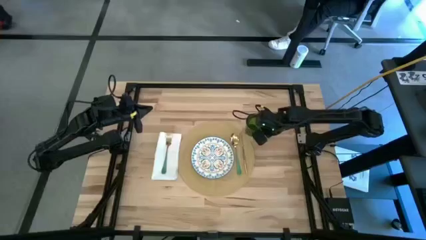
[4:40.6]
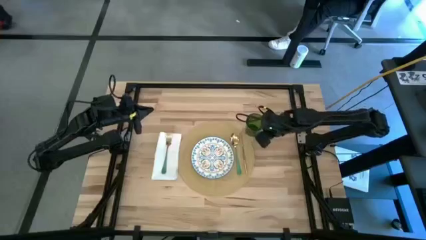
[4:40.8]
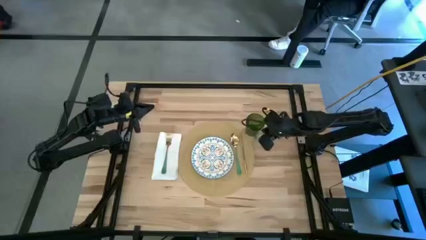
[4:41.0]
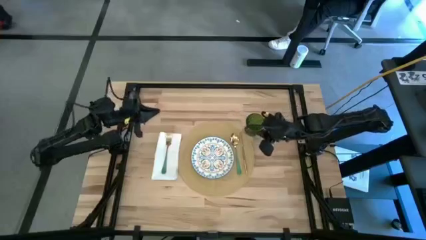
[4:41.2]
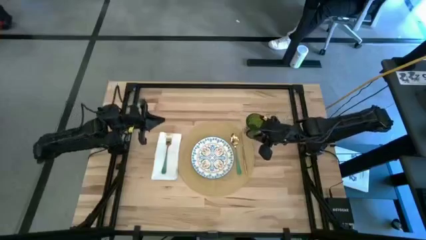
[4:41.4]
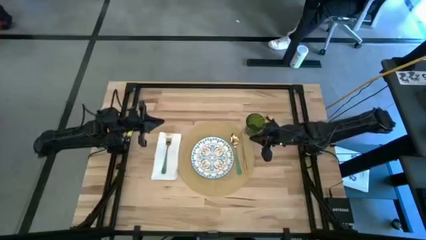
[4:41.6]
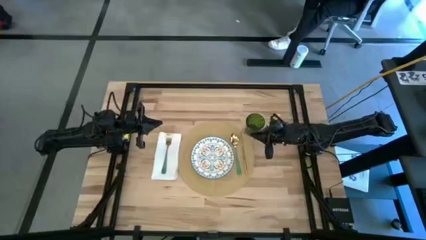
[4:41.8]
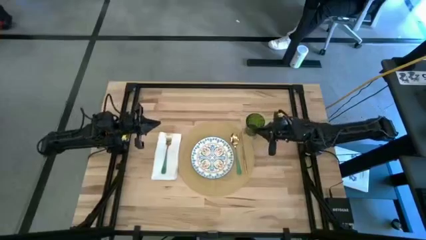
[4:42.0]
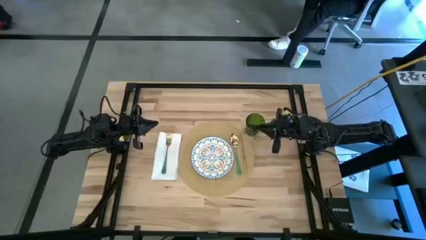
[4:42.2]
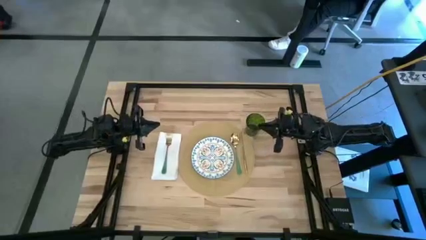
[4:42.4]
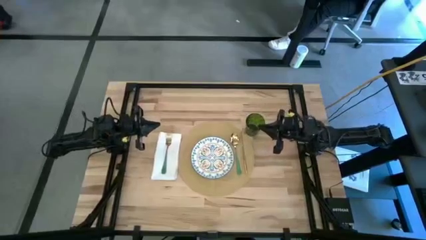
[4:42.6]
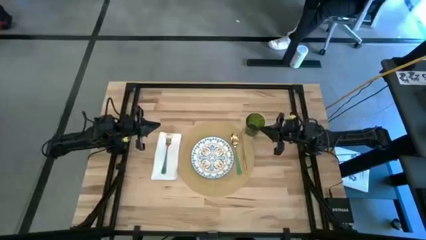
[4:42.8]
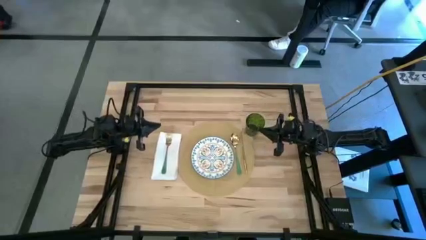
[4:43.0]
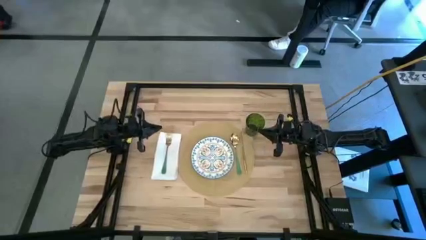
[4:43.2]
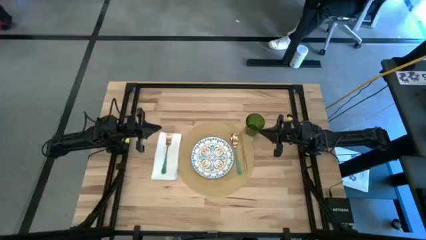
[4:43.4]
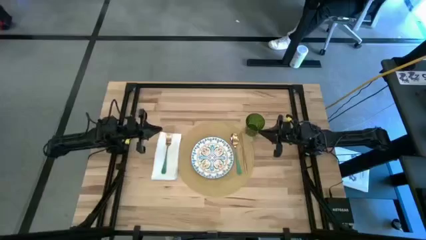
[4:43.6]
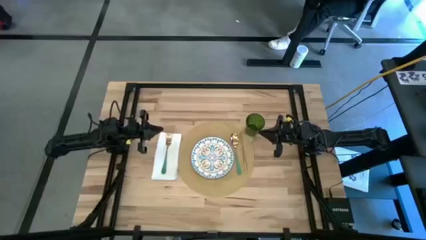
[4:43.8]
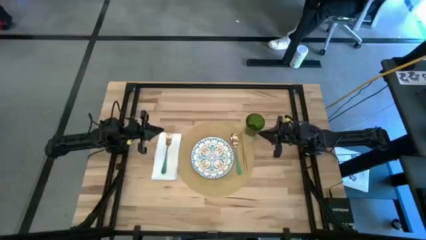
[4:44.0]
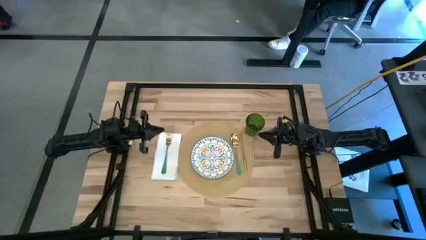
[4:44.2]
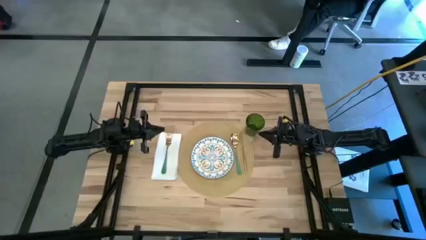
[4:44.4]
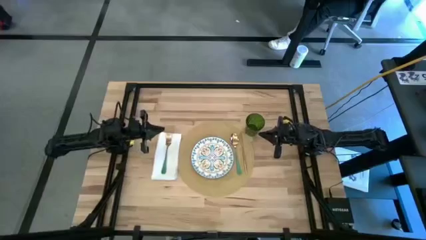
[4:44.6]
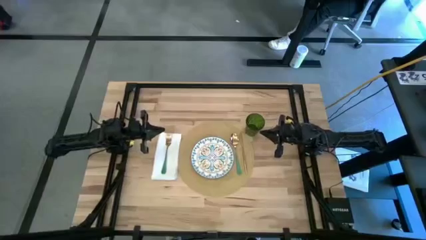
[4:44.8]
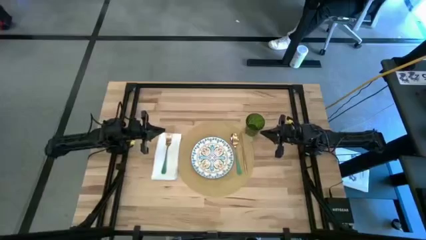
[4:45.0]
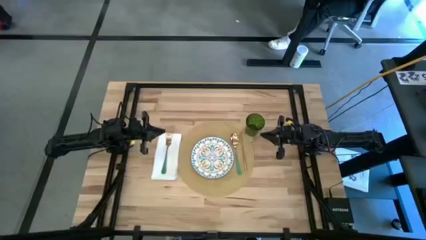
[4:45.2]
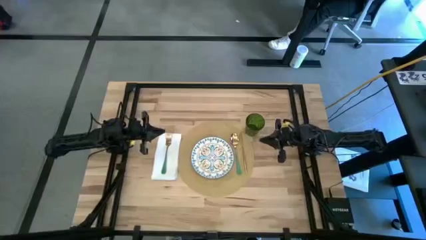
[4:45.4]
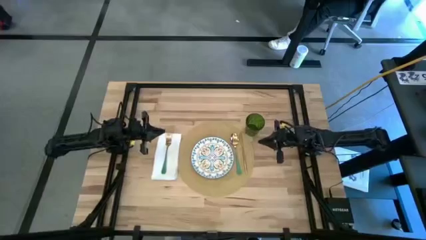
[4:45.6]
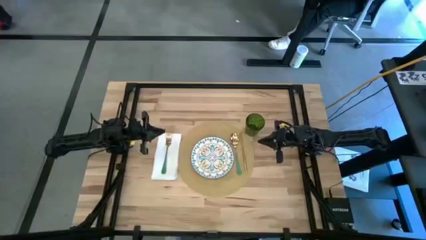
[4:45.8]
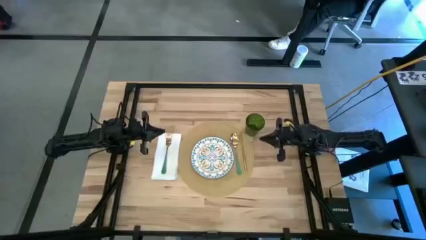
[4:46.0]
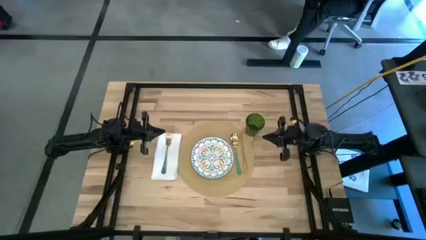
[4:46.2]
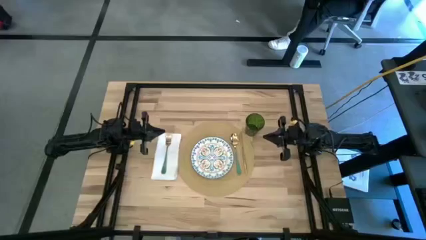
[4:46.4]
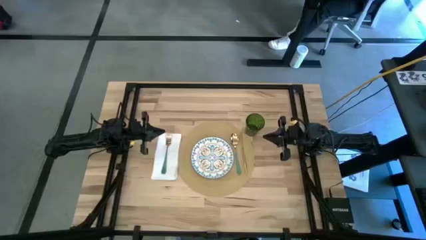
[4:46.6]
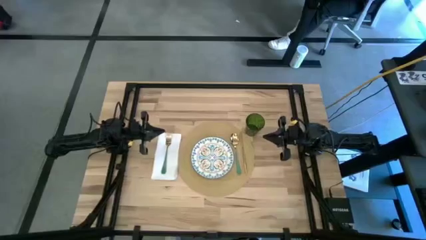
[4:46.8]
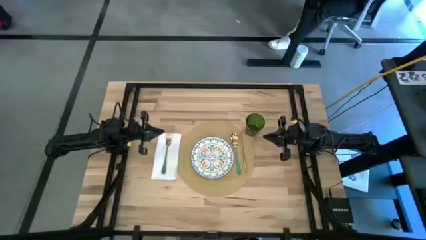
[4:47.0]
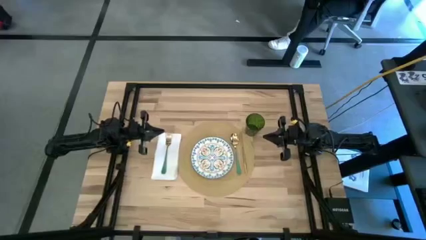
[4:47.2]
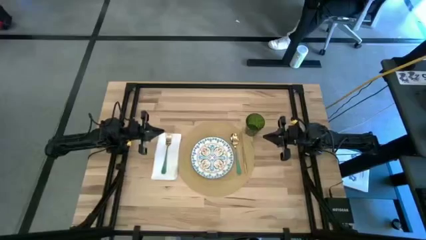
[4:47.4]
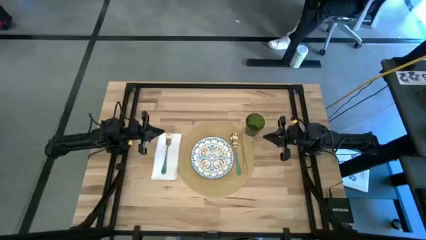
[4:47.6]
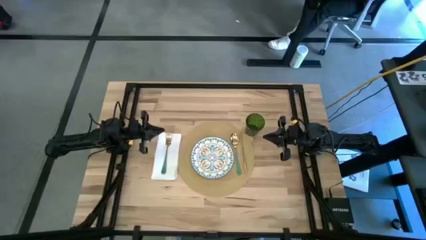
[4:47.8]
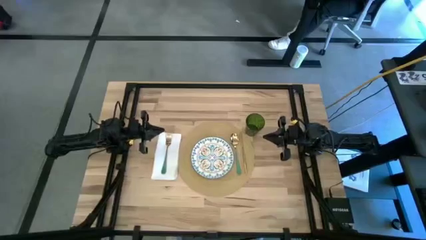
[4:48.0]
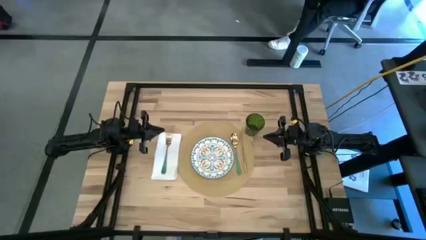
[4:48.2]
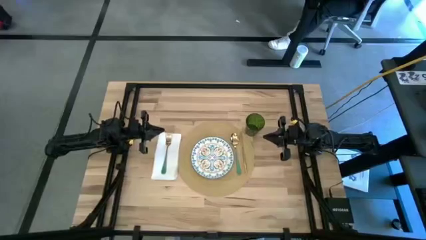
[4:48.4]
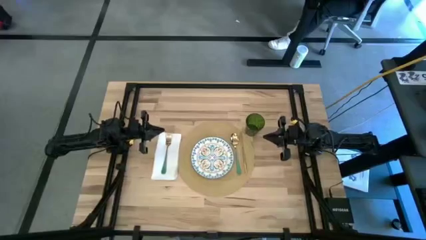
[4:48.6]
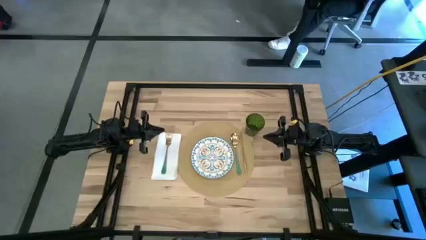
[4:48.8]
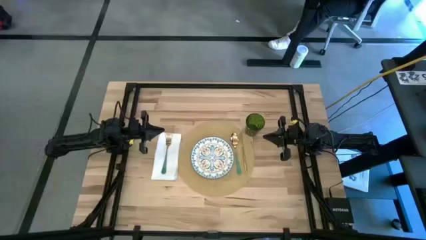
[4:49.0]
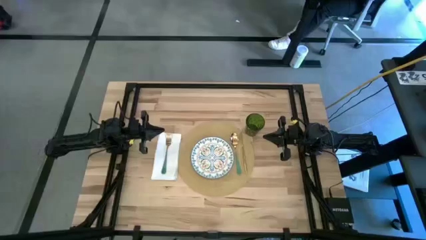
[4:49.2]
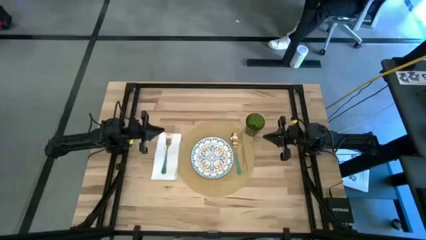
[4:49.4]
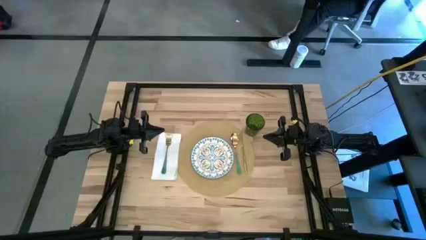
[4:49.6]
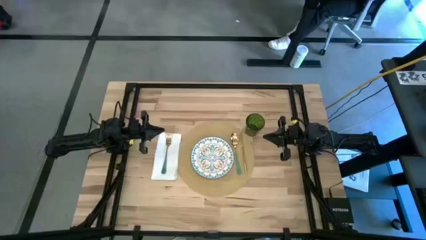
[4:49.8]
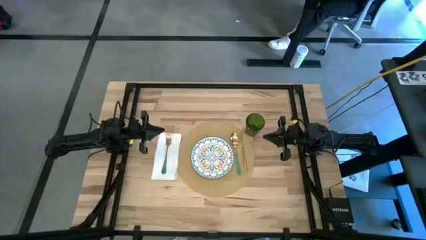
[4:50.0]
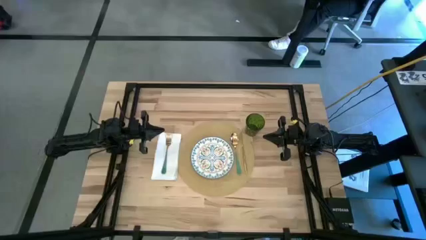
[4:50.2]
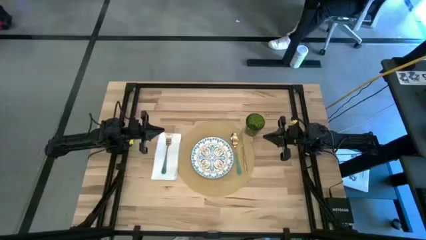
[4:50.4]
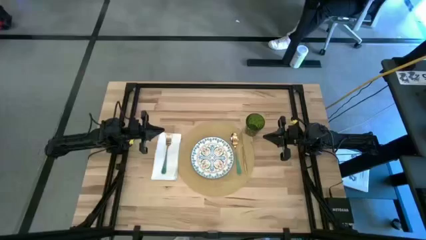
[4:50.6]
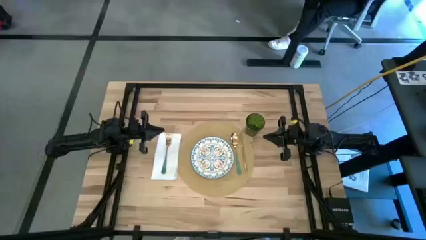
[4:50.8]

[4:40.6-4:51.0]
Task: Set table place
Return to Home Position

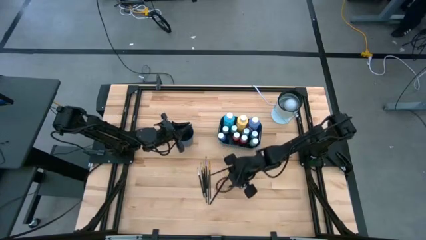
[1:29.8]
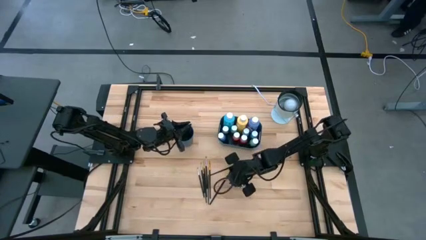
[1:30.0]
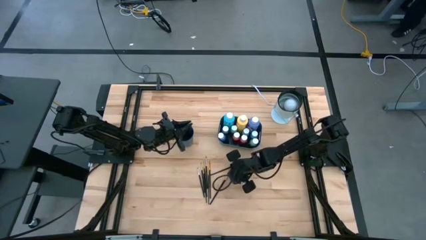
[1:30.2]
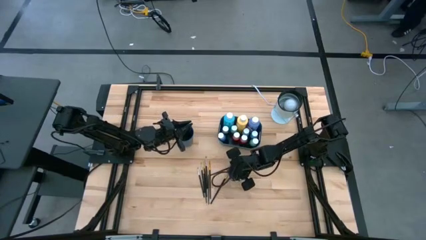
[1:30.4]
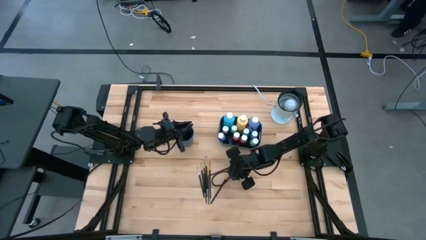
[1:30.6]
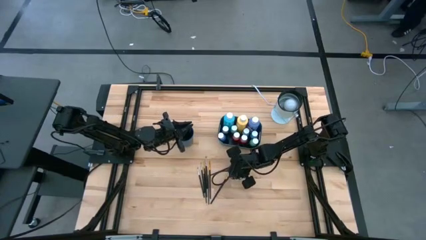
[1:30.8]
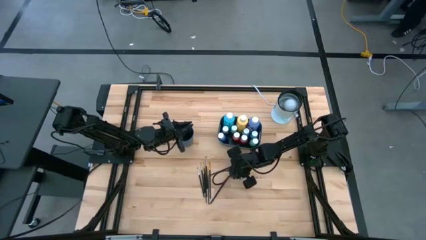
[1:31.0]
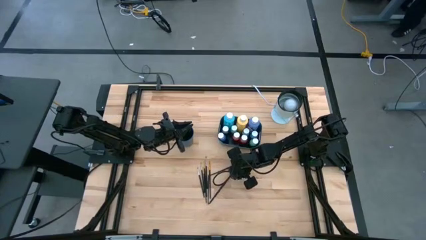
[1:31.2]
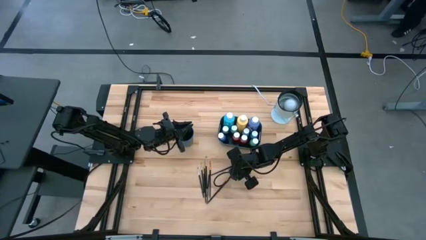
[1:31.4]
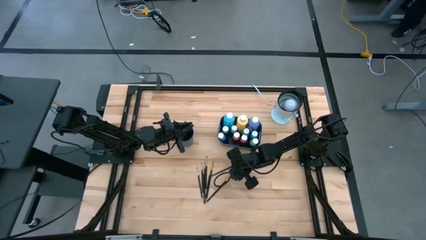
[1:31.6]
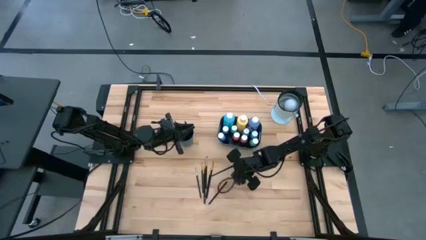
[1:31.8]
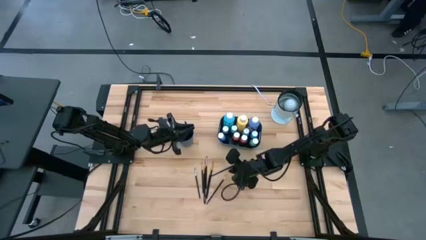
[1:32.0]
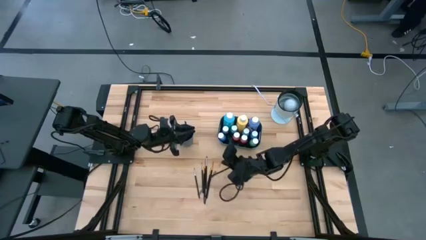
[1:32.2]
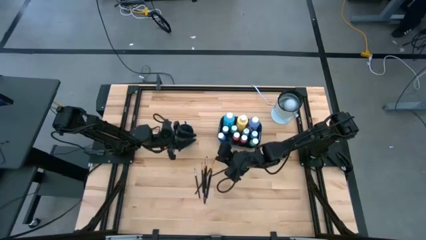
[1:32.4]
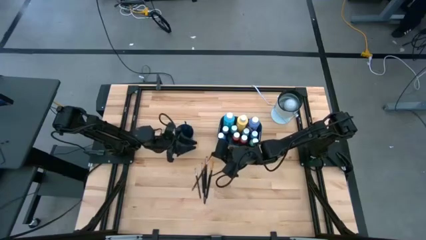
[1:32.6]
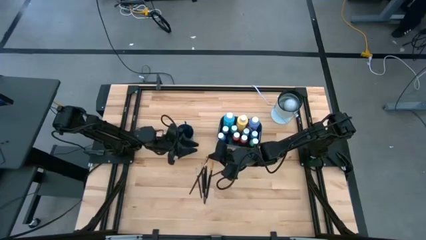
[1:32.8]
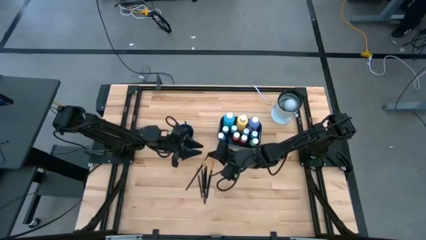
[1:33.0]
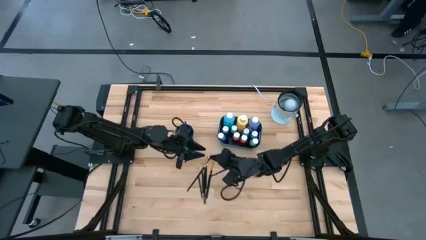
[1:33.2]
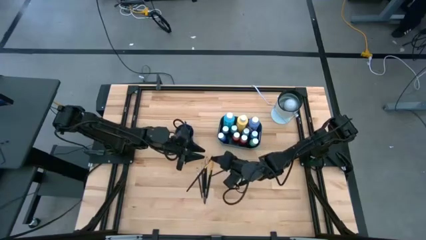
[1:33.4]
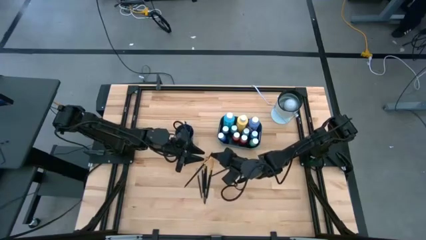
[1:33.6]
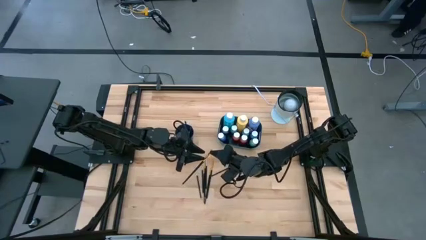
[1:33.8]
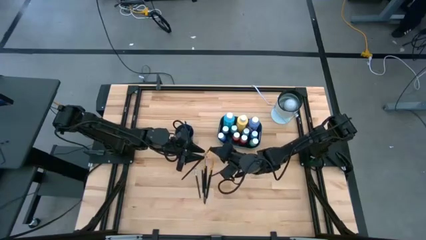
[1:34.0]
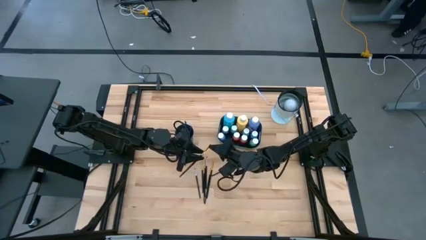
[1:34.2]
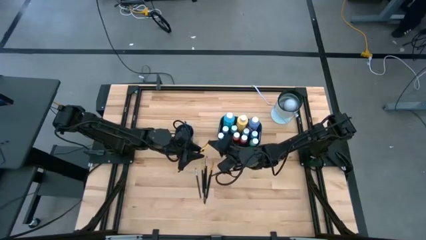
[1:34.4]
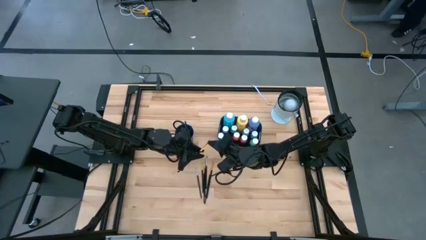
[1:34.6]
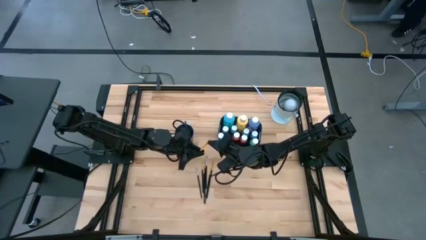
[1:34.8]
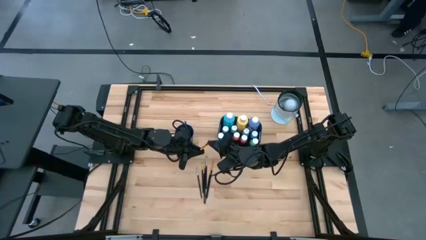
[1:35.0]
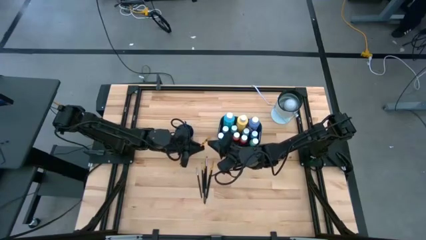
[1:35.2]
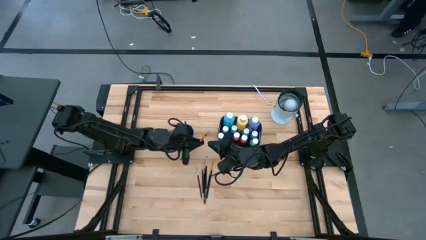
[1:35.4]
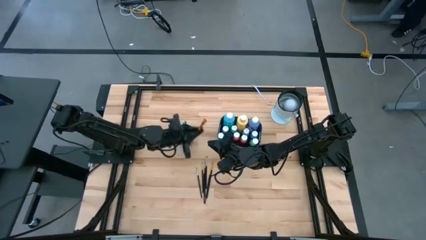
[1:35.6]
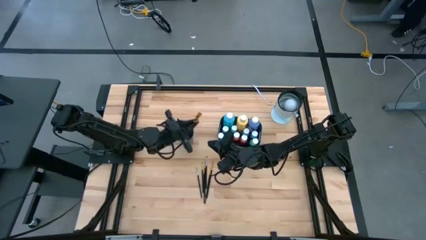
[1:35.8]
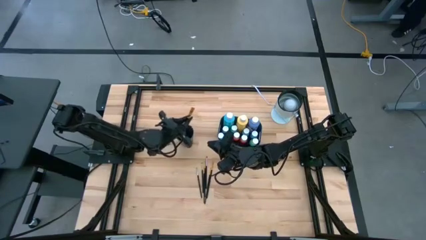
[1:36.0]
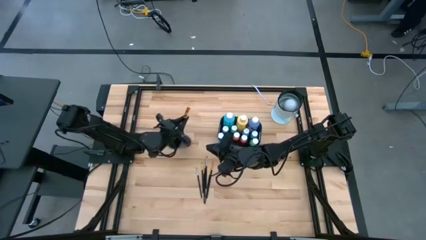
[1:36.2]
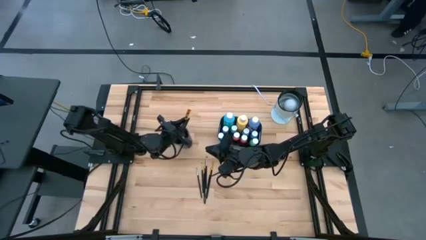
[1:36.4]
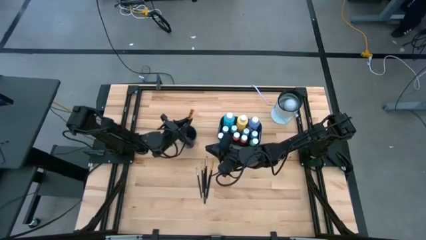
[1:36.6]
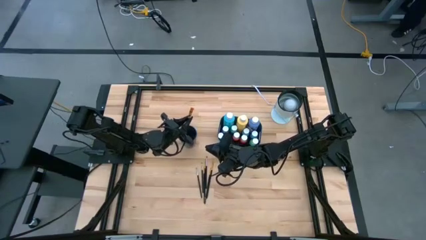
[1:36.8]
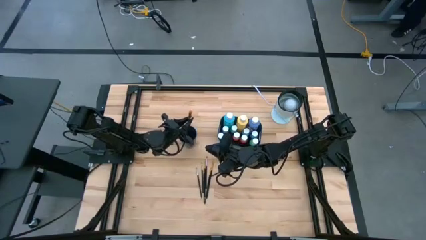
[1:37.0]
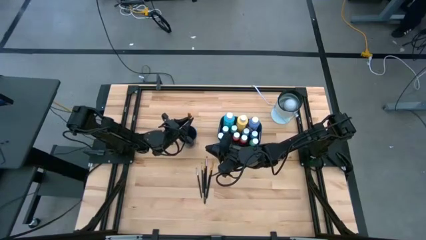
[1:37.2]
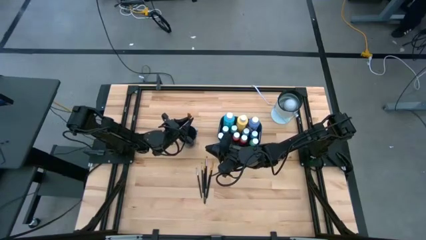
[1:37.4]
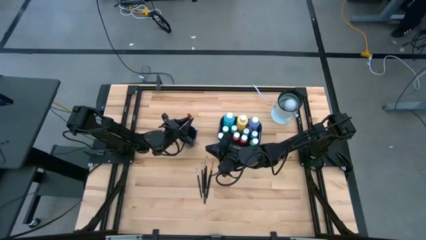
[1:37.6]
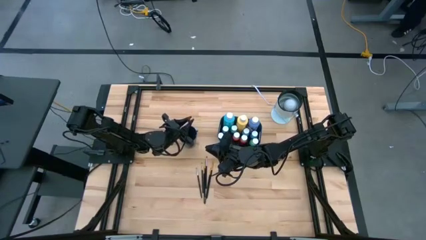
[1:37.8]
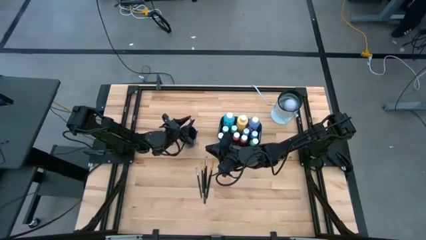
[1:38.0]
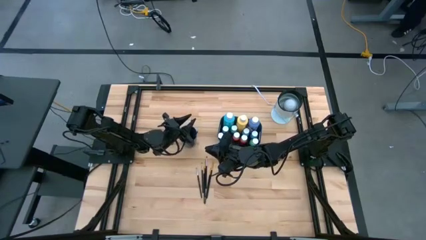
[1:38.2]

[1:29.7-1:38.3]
Task: Pick & Place Paint Supplies
Put the gold paintbrush into the blue cup
